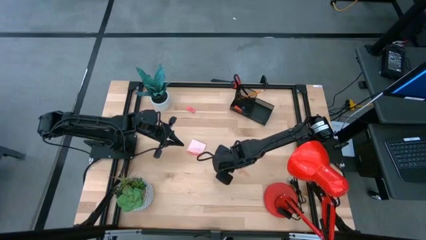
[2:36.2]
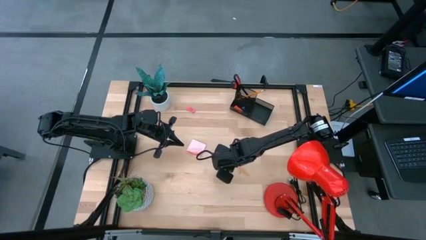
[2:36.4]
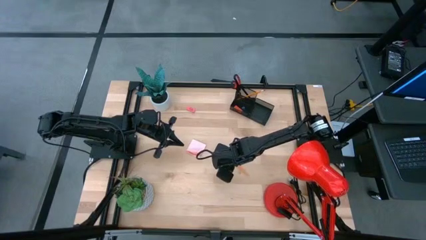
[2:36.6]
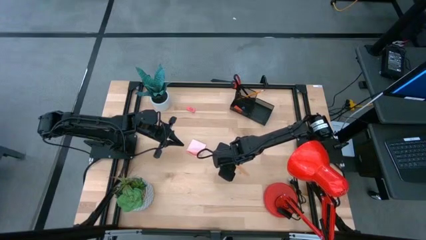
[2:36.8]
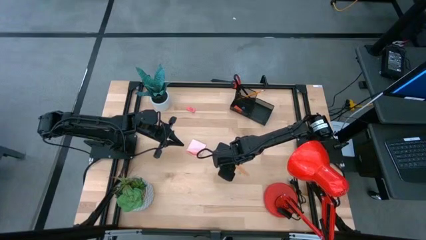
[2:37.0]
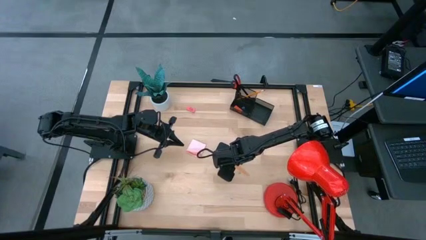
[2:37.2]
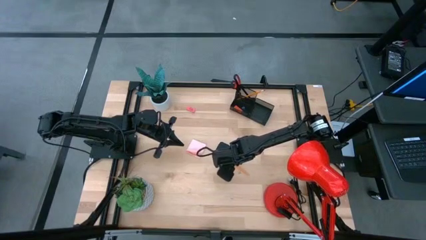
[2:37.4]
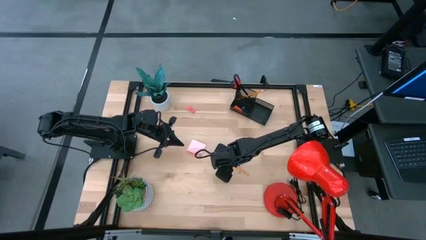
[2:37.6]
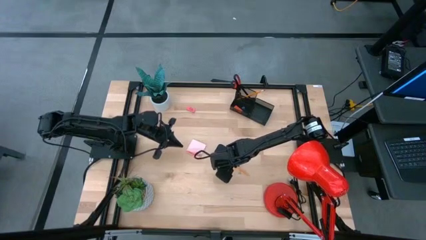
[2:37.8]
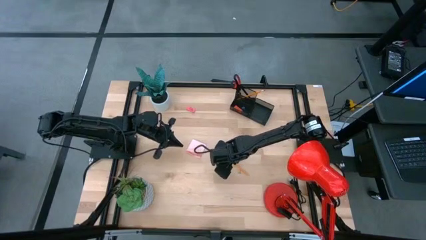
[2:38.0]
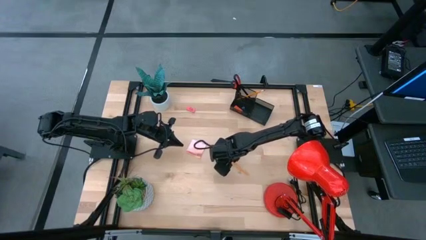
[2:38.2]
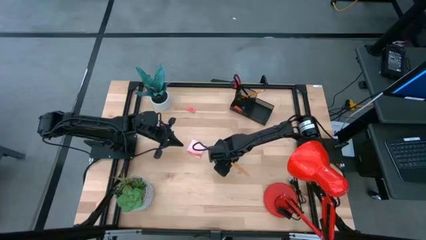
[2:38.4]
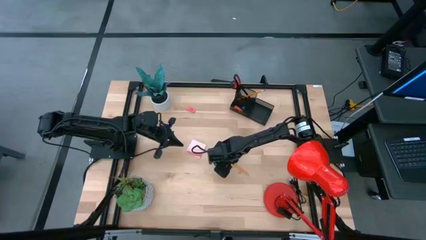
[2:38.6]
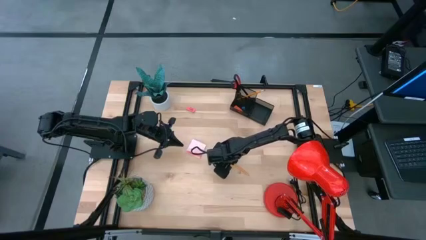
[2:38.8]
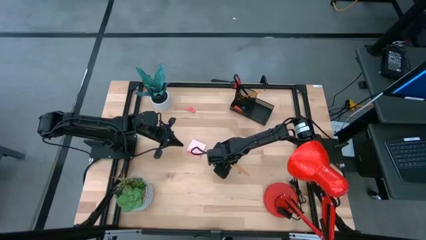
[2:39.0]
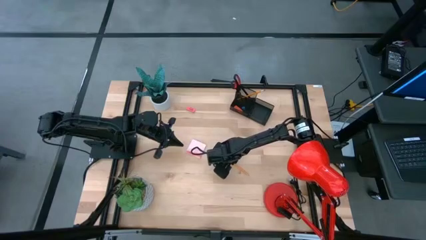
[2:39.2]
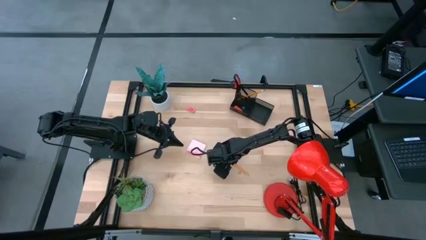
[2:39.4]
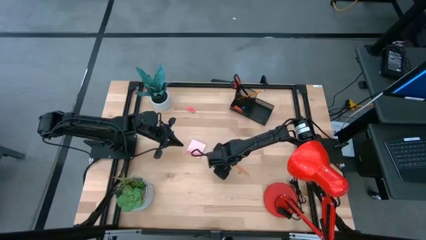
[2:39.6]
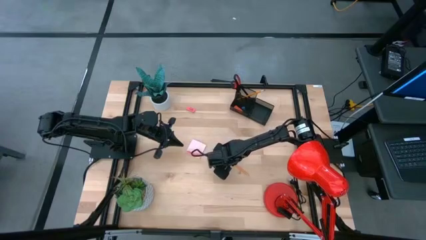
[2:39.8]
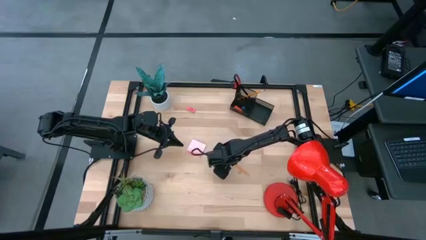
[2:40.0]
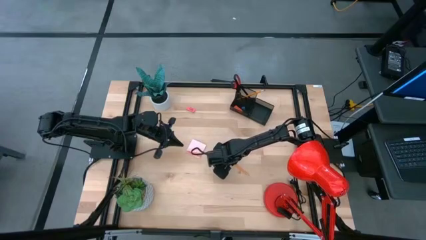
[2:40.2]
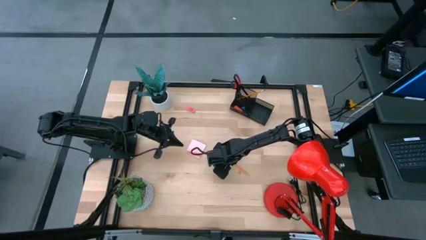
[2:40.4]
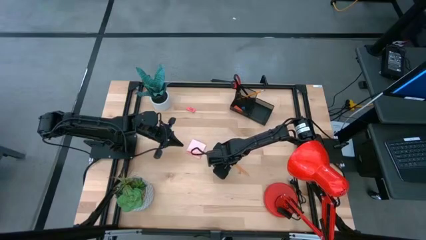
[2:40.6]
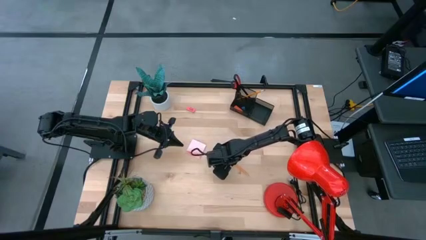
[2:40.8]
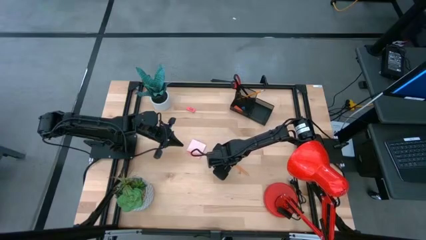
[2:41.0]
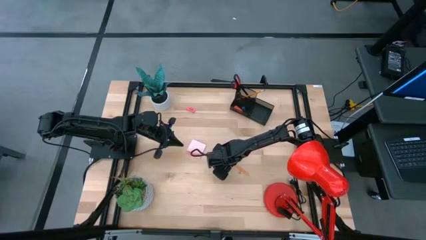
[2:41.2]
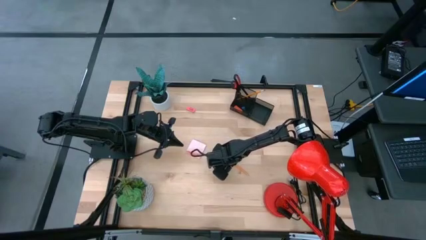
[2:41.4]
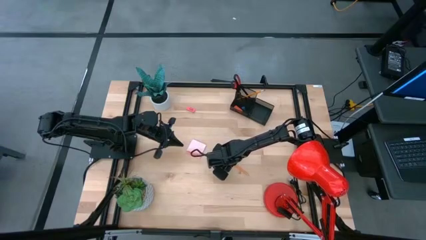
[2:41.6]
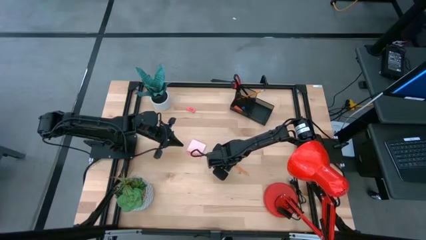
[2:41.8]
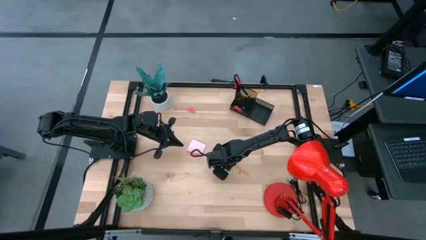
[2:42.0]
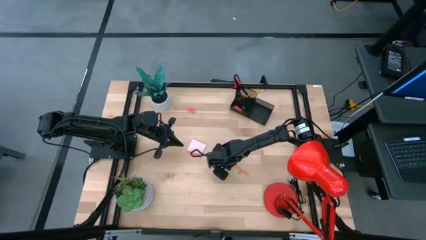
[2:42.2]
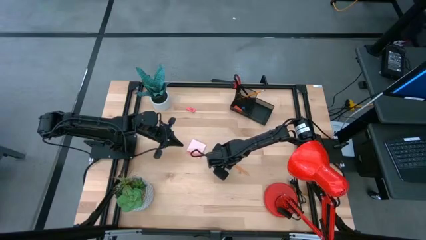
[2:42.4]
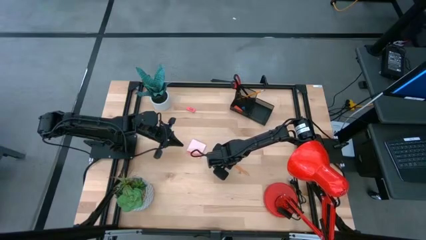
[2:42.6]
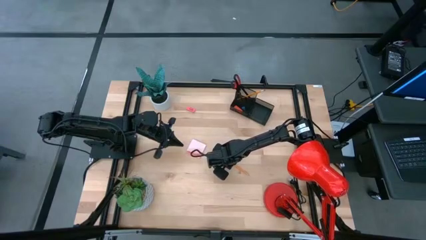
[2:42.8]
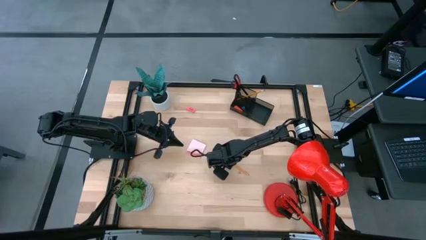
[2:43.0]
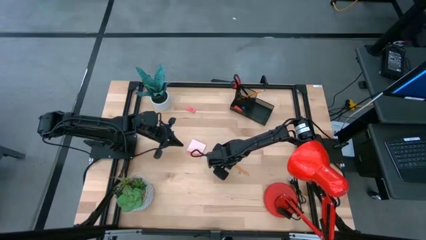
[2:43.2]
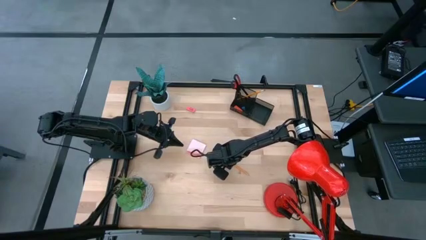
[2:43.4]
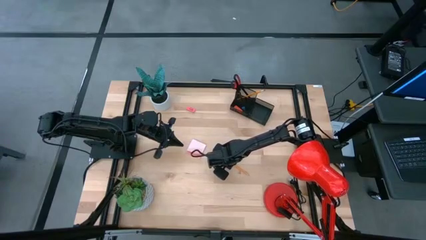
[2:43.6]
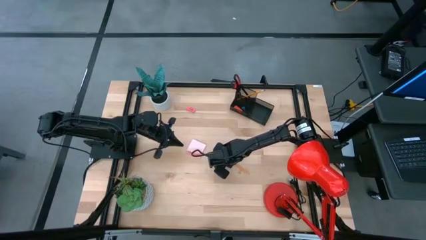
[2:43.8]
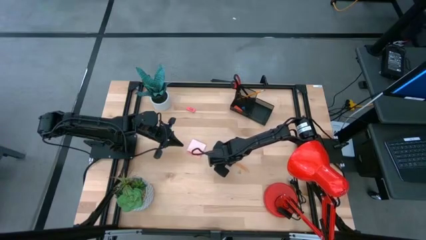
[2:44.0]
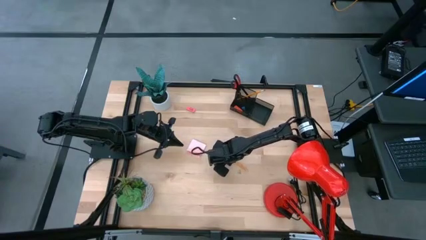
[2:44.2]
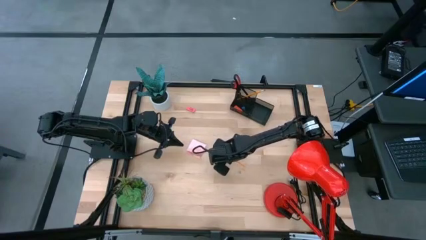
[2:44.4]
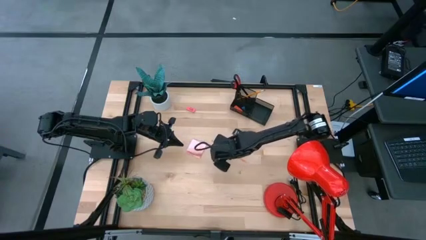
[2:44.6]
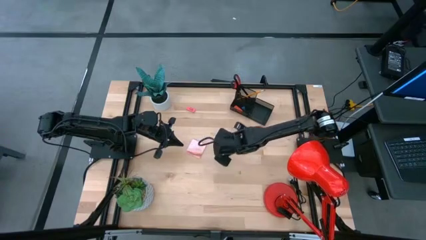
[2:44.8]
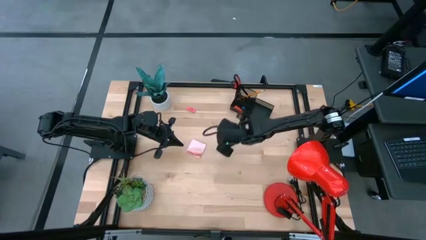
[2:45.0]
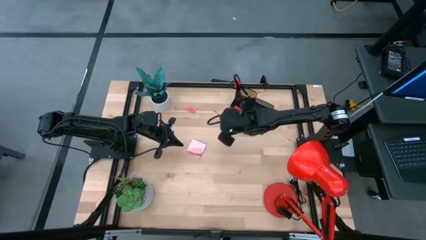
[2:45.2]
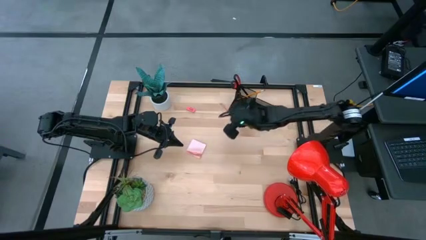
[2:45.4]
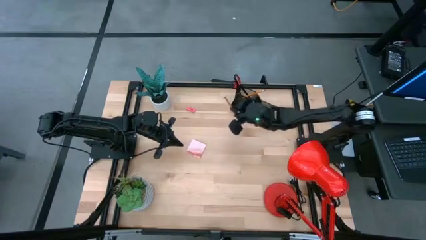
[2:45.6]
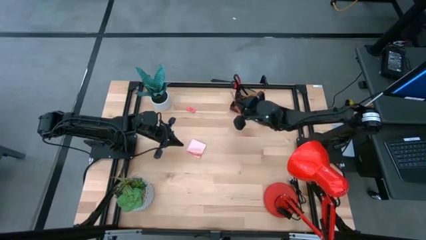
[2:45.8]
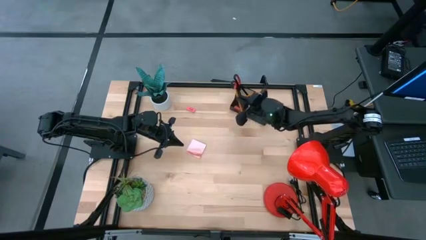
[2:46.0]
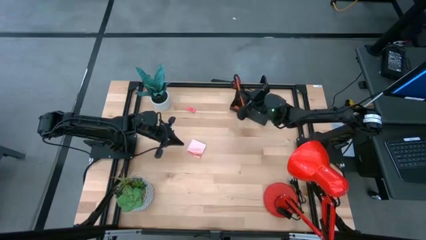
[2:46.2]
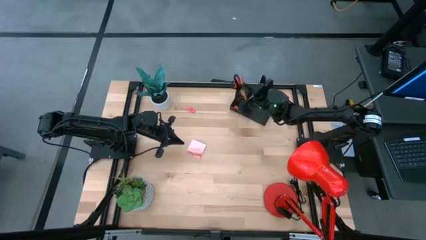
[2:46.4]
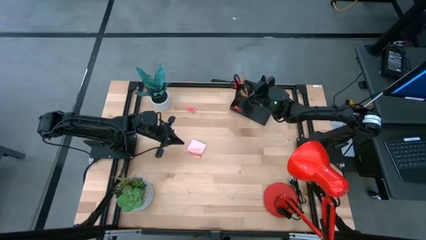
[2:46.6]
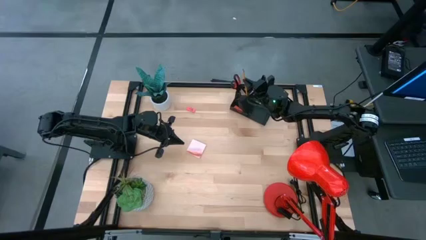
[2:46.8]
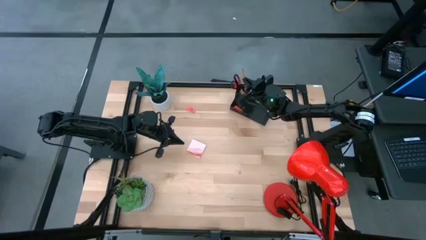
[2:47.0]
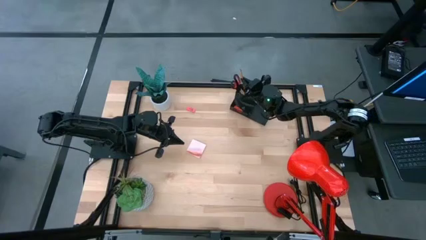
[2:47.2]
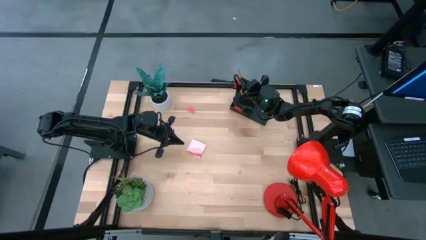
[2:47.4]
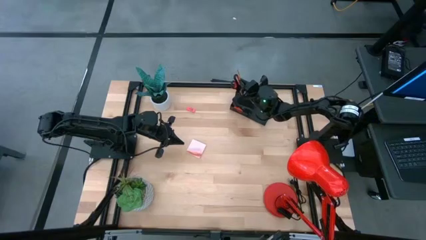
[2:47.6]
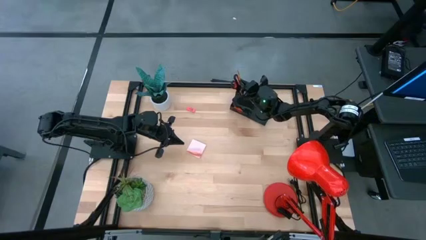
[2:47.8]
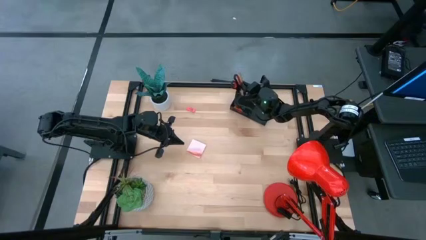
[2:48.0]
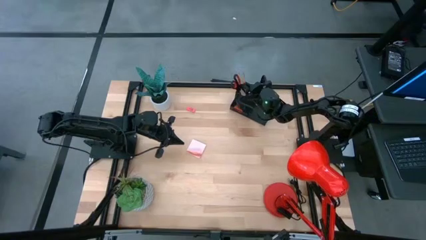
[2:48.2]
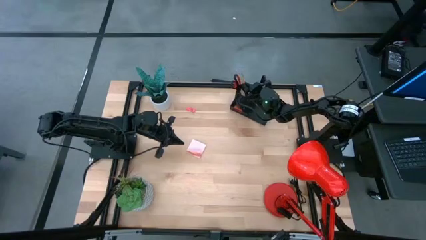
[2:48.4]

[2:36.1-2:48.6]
Task: Pick and place office supplies into organizer
Put the pencil into the black desk organizer
